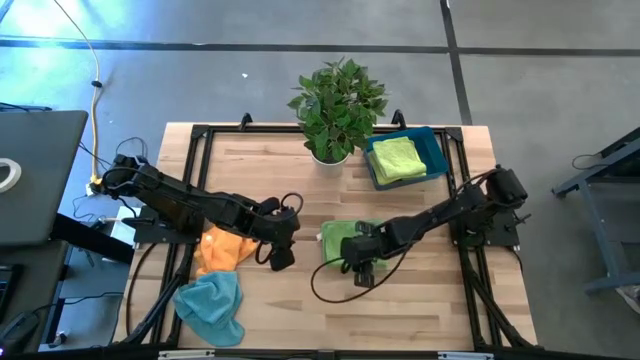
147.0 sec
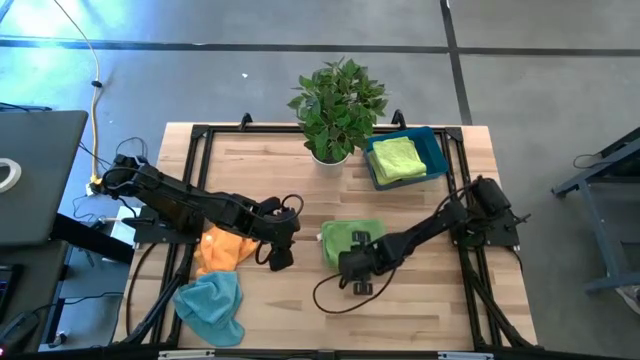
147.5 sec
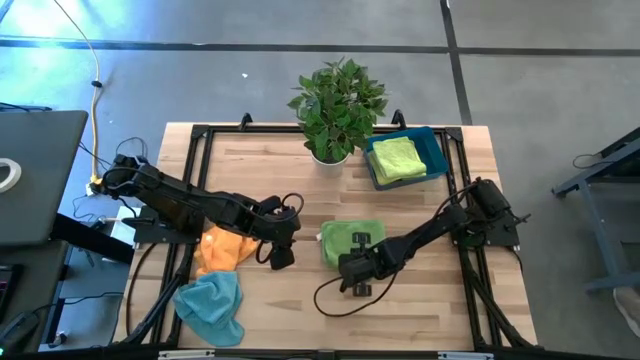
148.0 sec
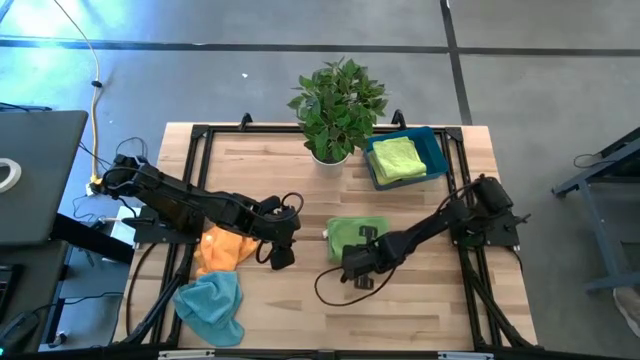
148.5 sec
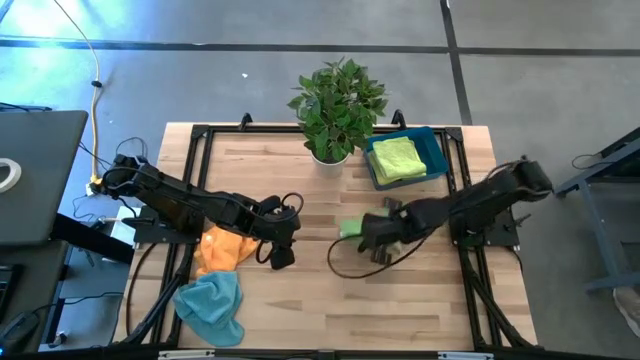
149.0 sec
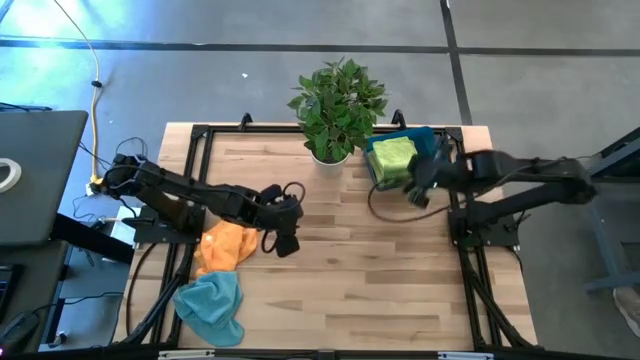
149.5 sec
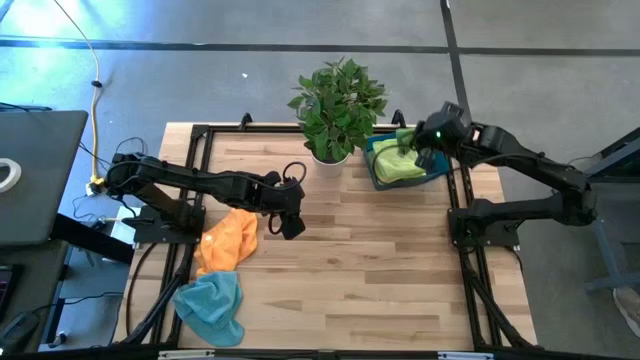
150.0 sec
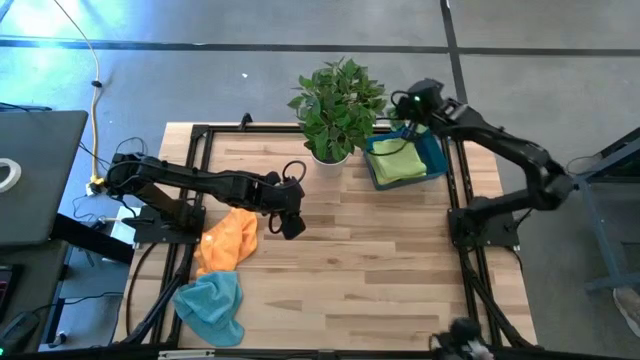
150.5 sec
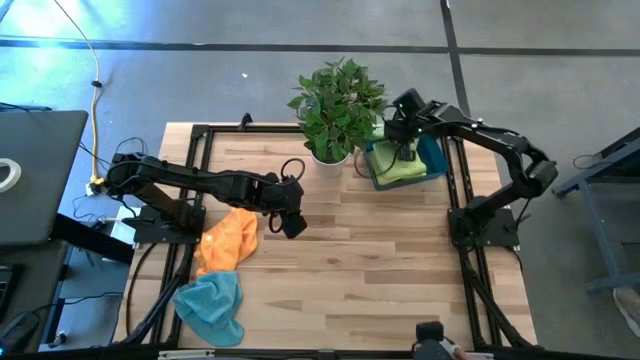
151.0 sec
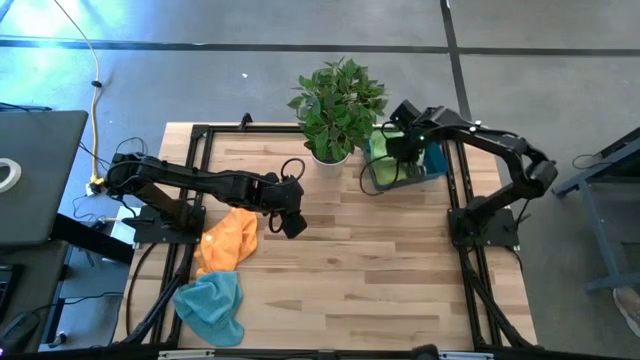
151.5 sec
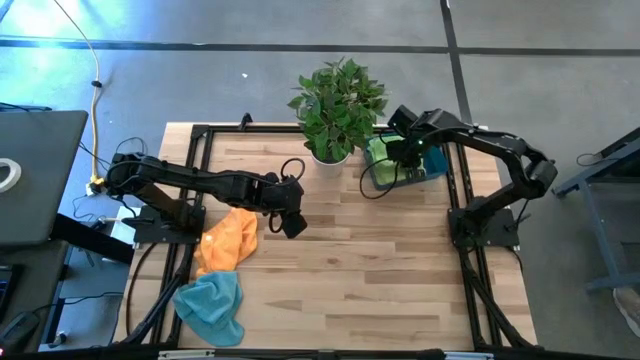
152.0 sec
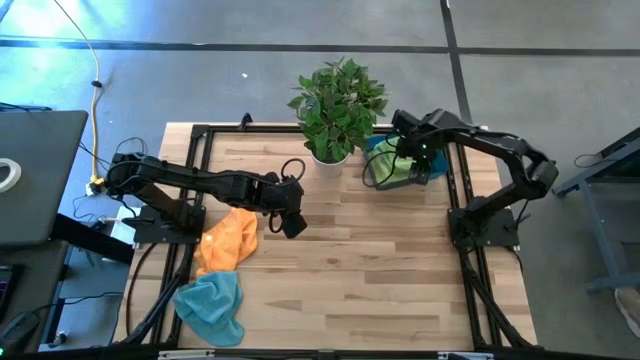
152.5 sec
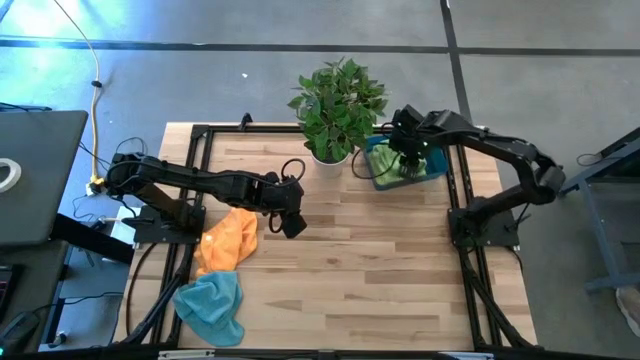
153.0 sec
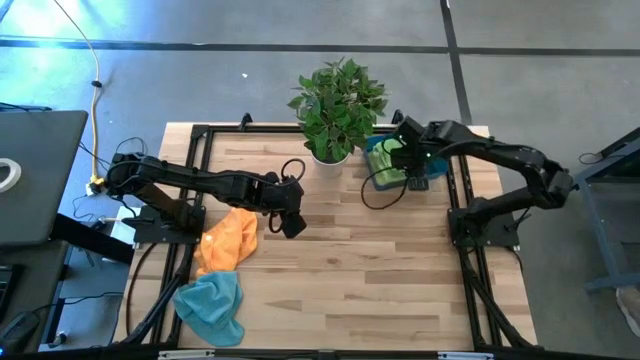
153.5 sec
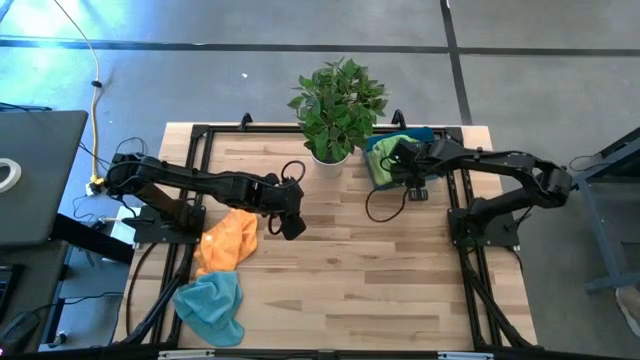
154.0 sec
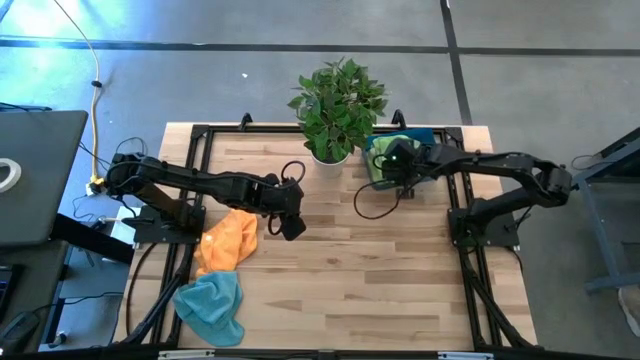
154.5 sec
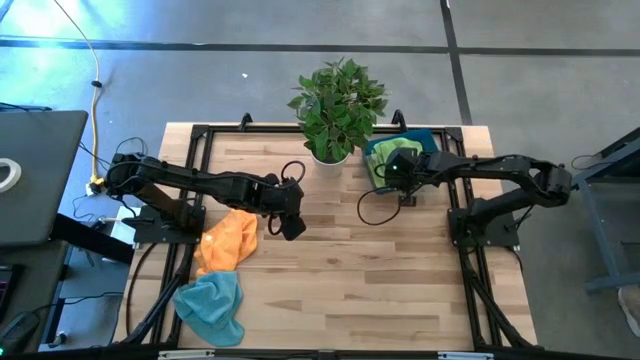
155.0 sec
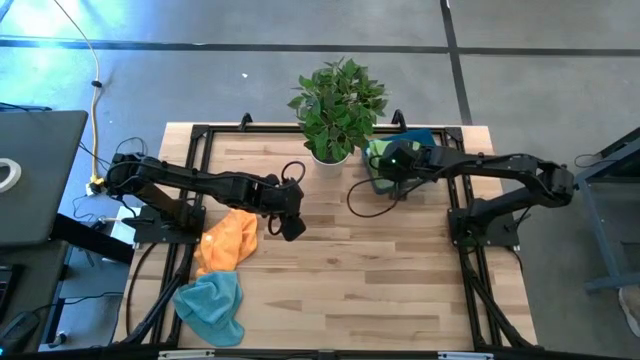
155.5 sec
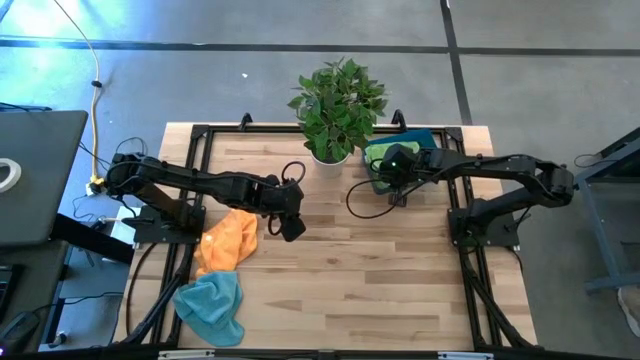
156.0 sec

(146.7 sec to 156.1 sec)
Task: Sort microfiber towel by color & place in baskets
Stack the green towel on top of the light green towel into the blue bin

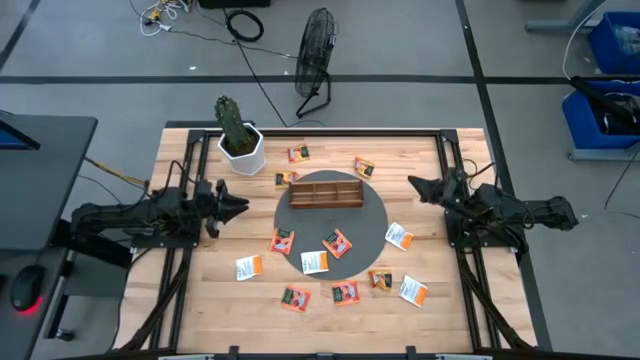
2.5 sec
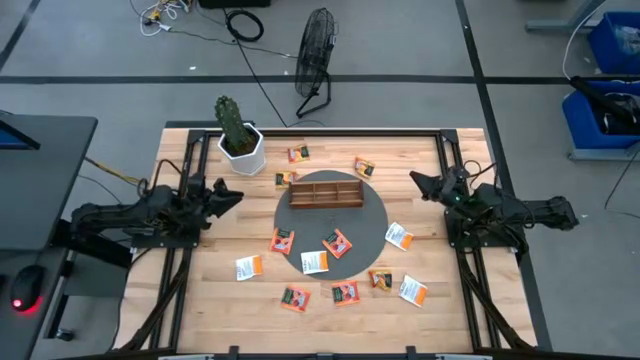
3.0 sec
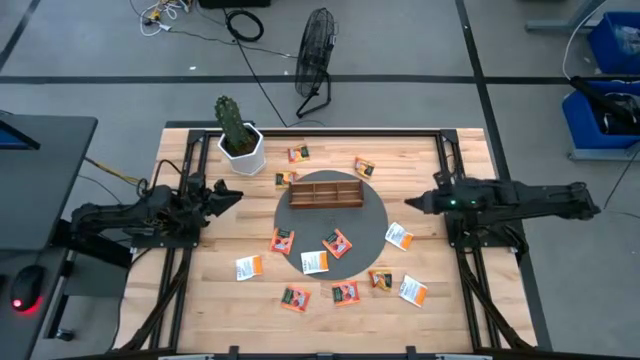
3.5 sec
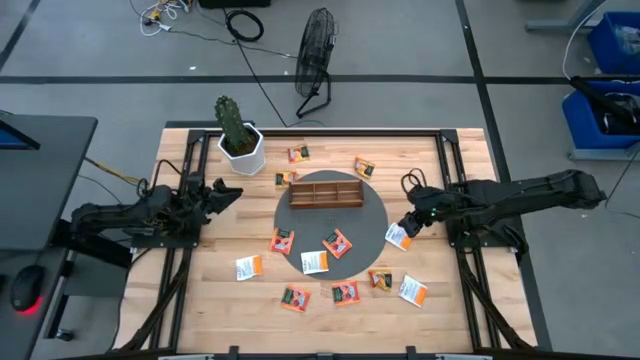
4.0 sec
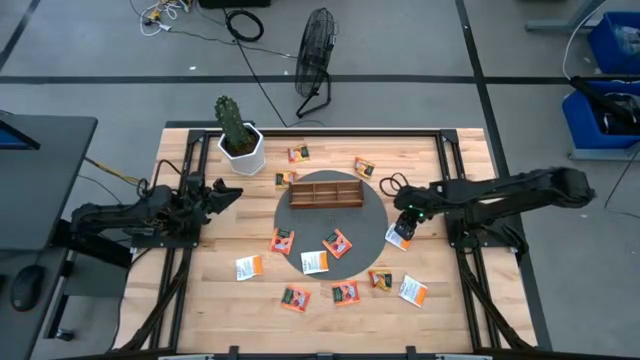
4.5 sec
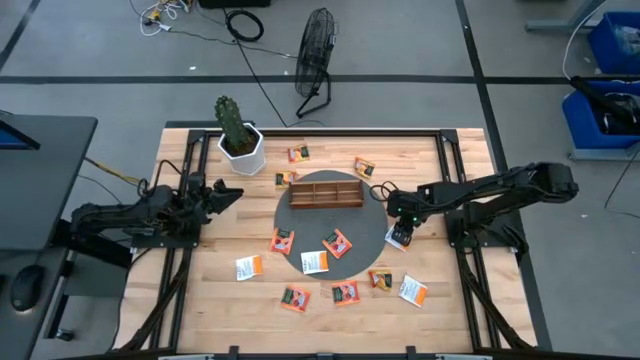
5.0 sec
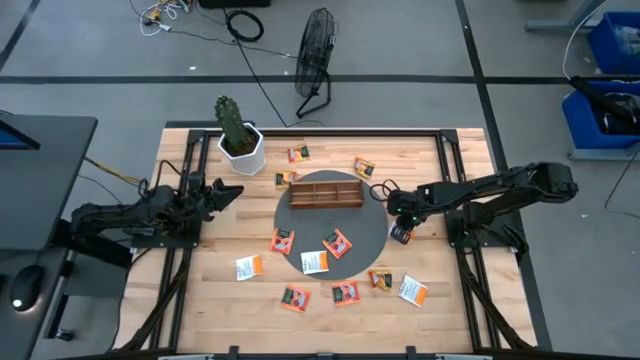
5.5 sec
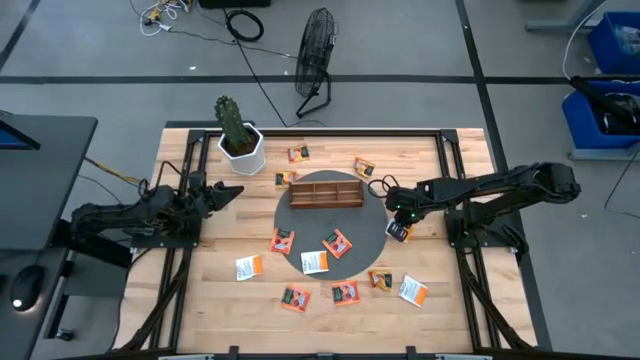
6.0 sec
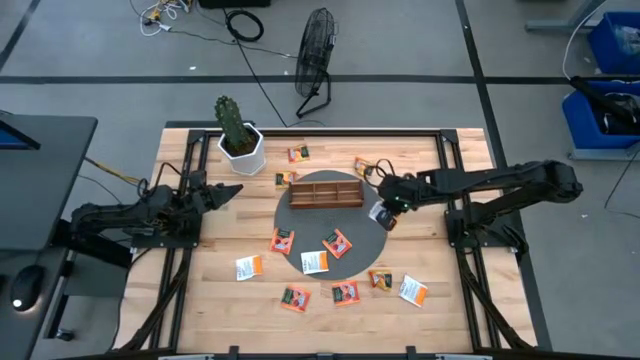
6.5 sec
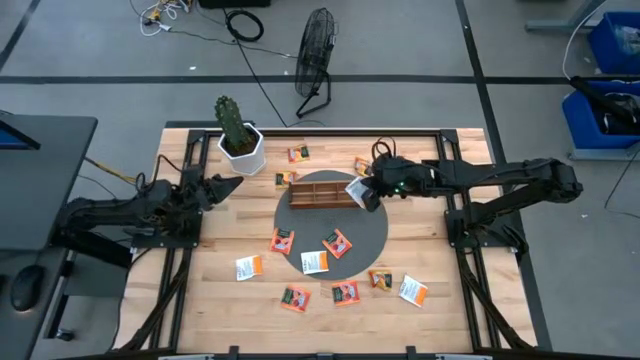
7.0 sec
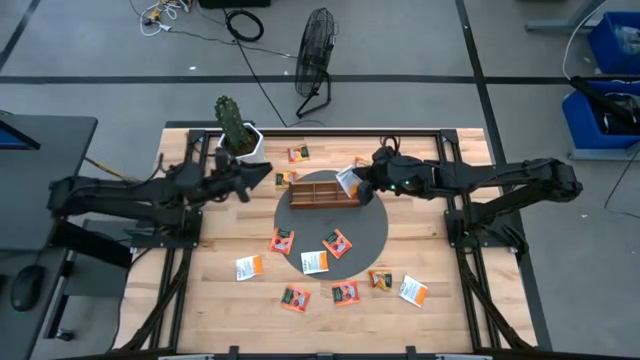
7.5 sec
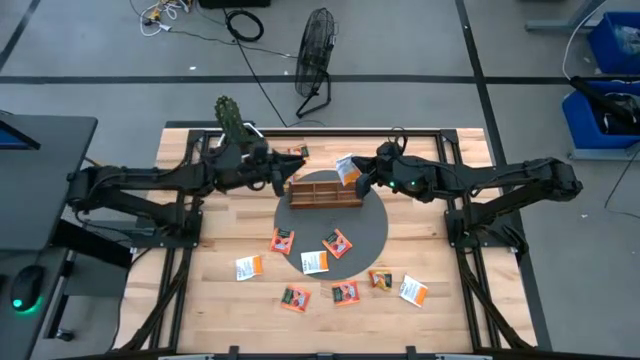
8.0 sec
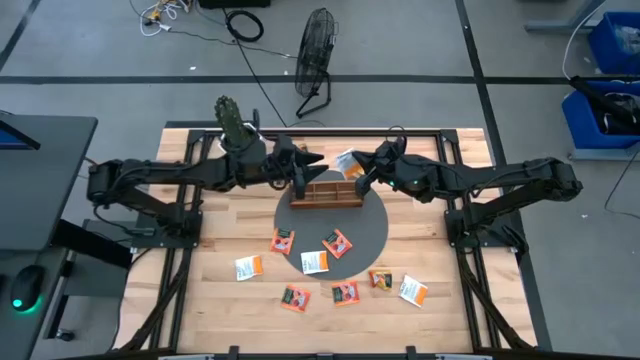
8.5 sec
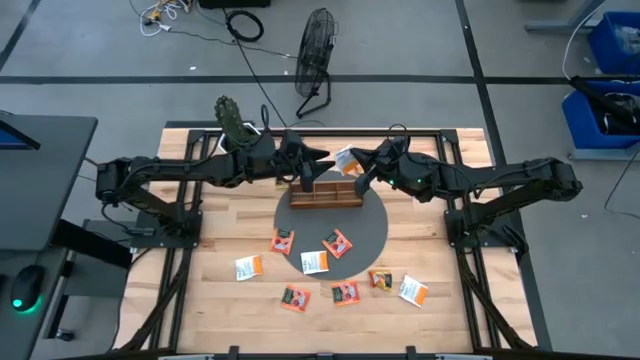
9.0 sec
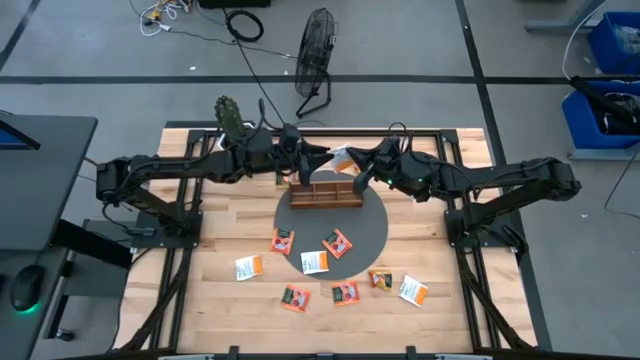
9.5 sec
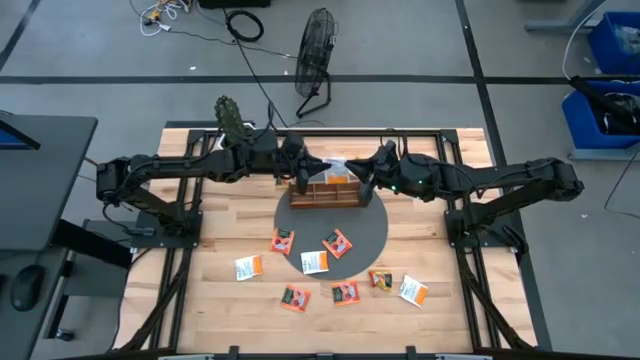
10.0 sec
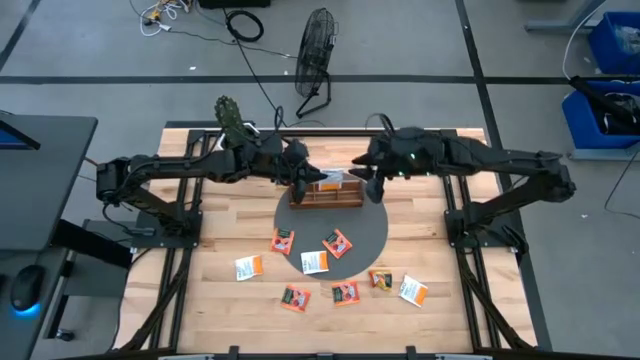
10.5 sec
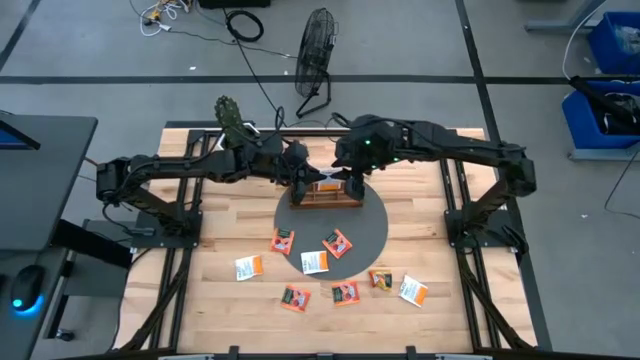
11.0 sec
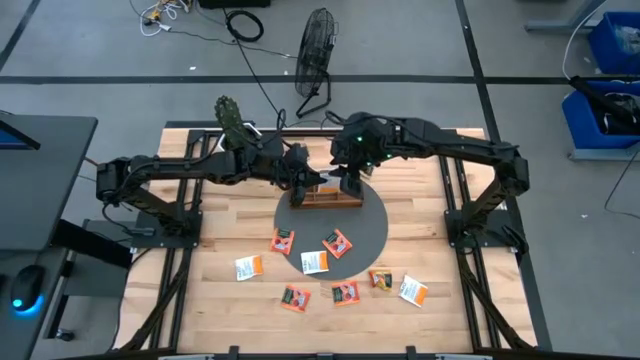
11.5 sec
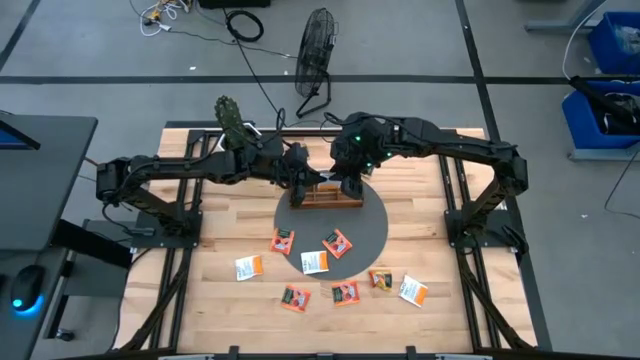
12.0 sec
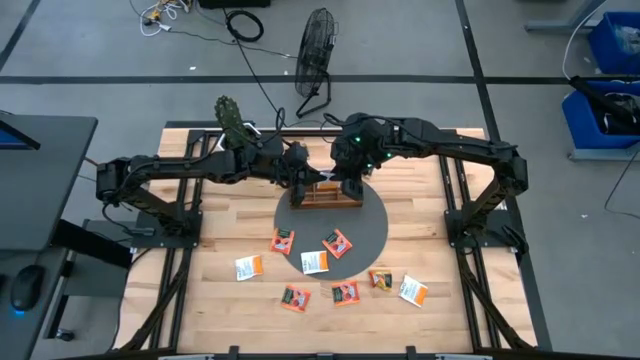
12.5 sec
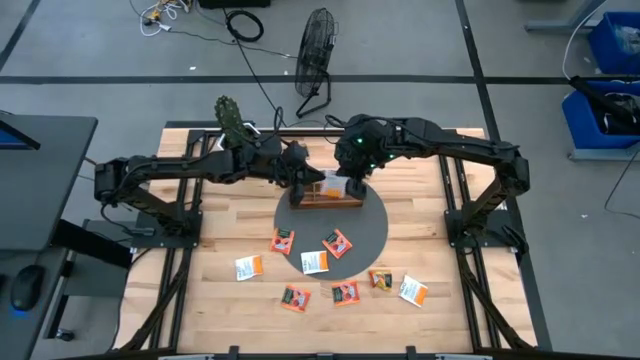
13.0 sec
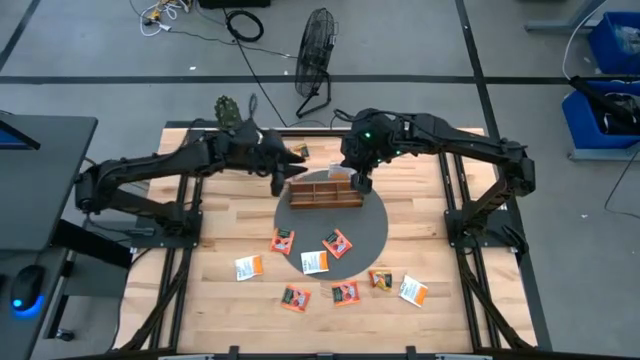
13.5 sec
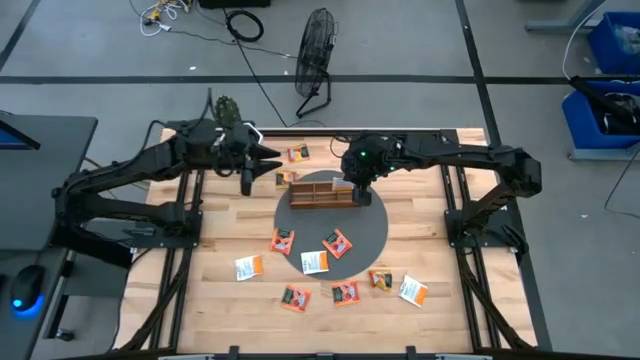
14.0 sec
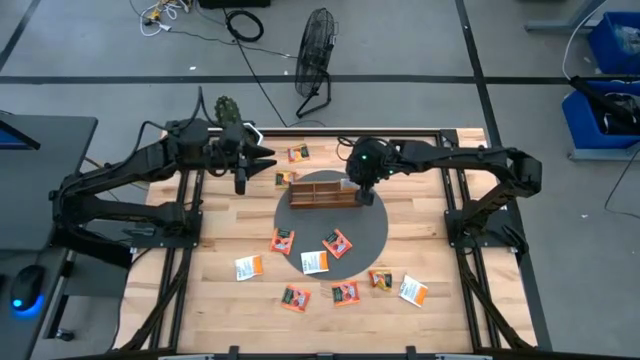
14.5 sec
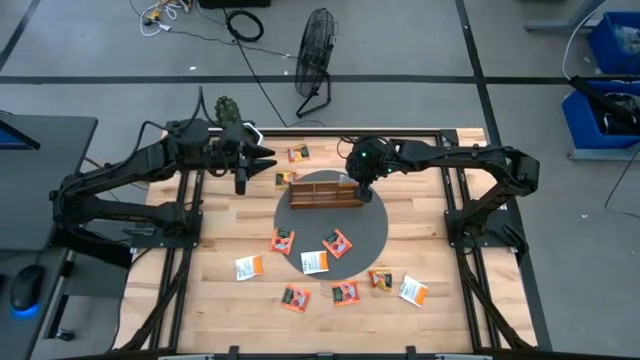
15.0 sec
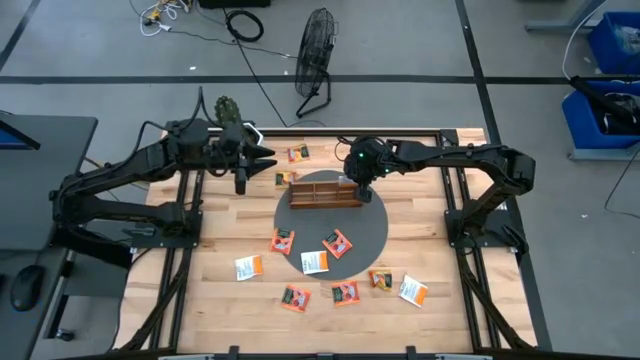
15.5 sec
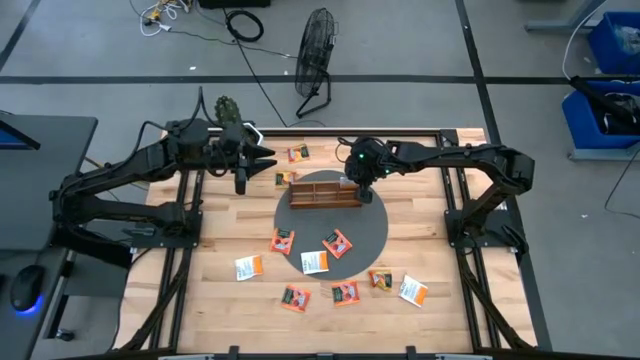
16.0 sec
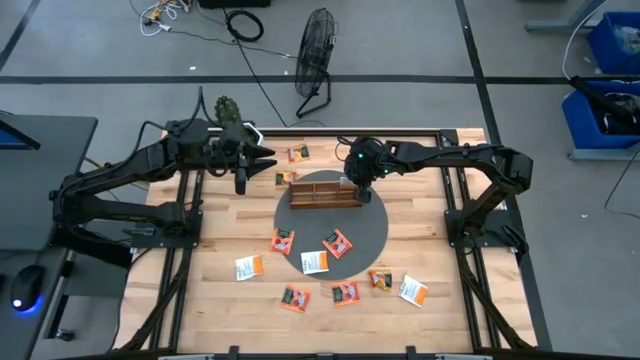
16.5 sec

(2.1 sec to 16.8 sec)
Task: Pick & Place Tea
Put the white tea bag into the right section of the wooden organizer
